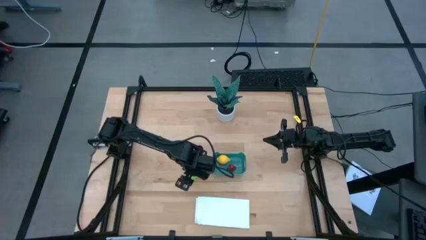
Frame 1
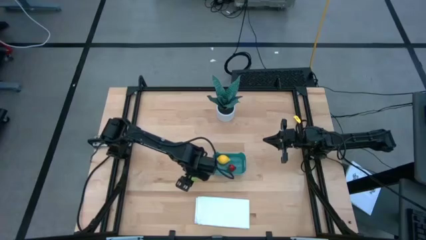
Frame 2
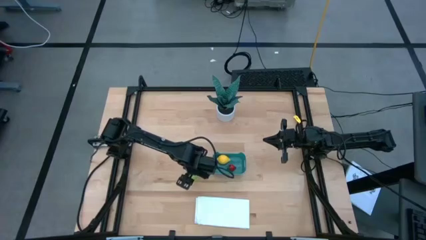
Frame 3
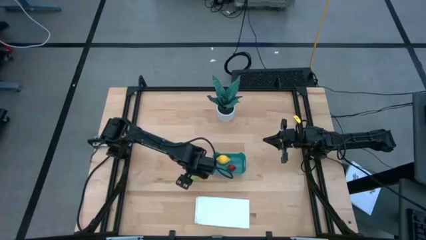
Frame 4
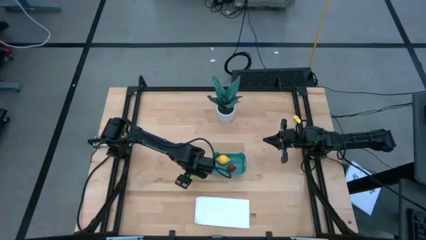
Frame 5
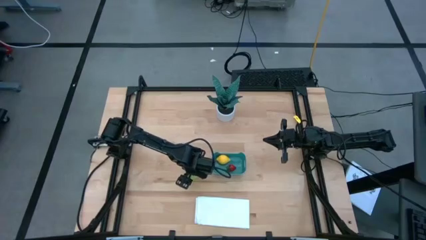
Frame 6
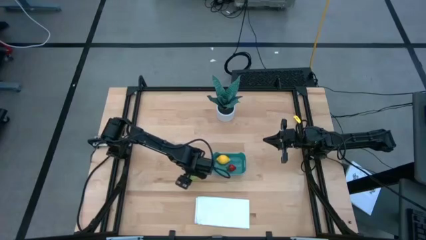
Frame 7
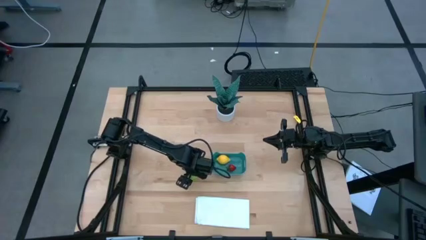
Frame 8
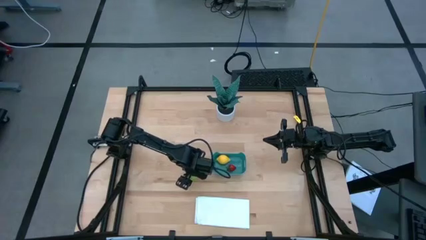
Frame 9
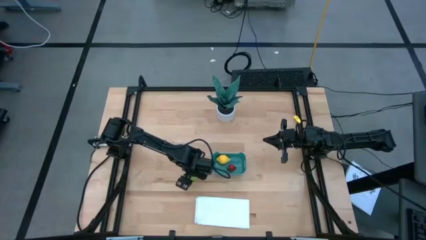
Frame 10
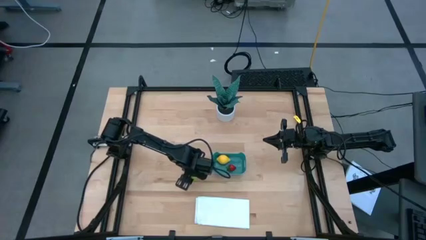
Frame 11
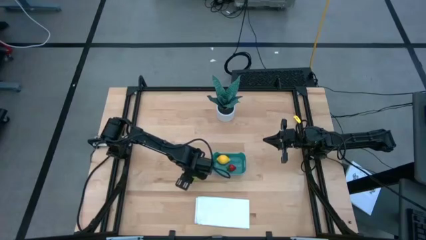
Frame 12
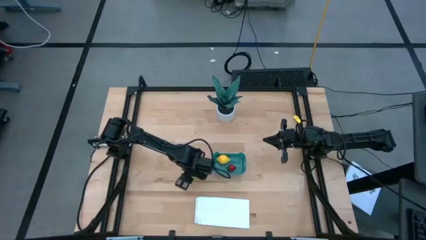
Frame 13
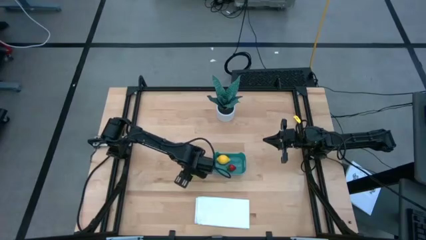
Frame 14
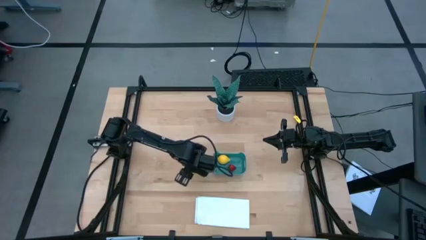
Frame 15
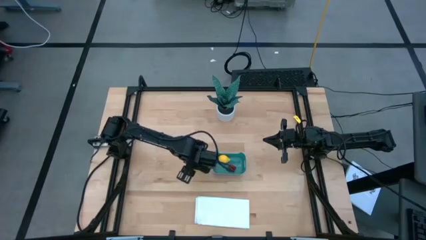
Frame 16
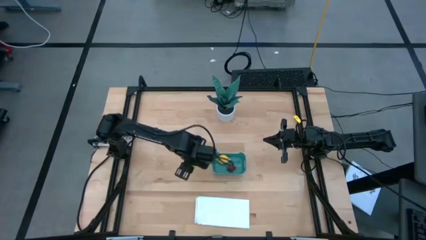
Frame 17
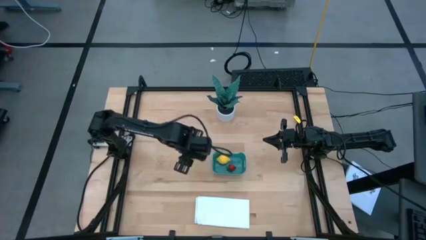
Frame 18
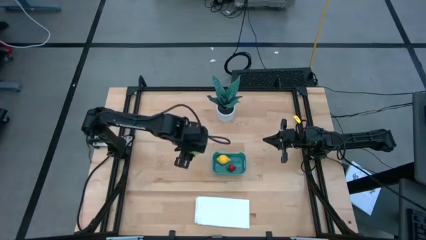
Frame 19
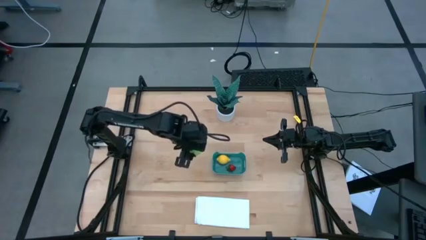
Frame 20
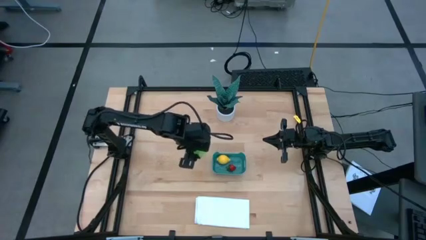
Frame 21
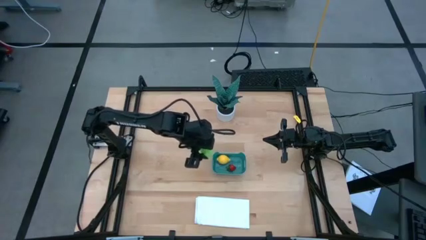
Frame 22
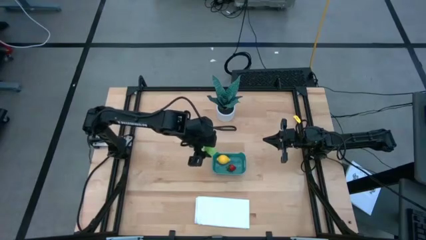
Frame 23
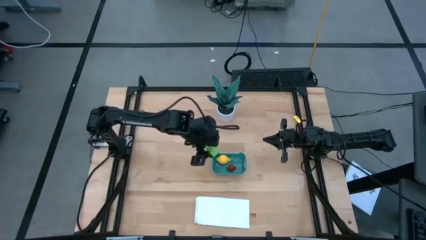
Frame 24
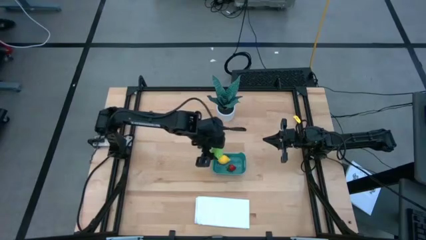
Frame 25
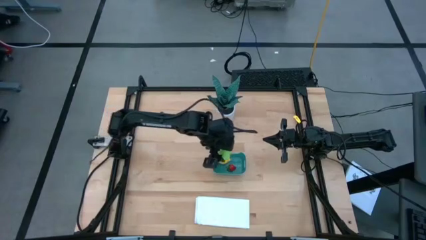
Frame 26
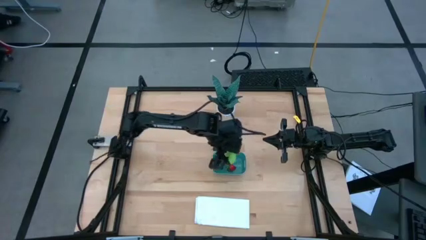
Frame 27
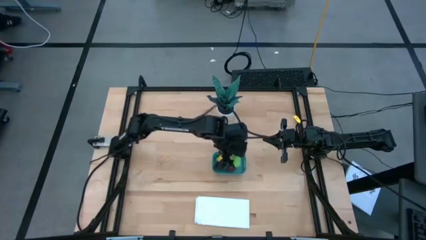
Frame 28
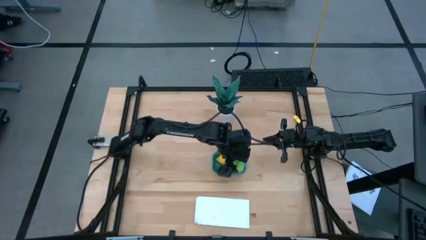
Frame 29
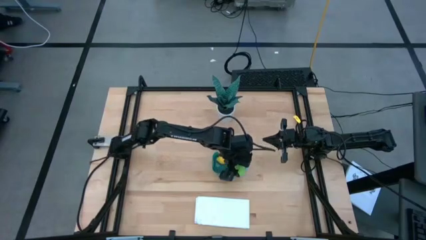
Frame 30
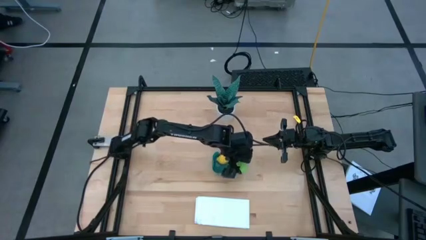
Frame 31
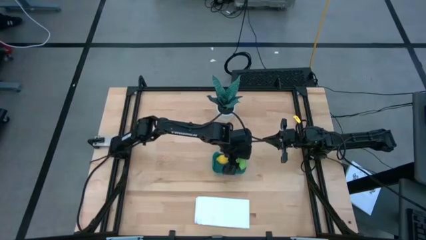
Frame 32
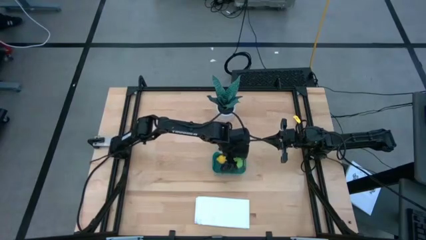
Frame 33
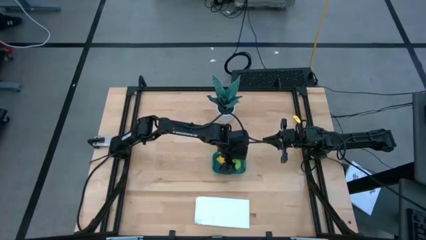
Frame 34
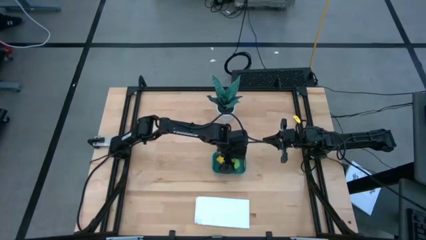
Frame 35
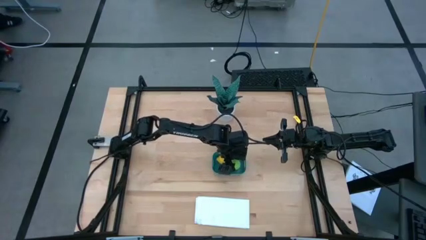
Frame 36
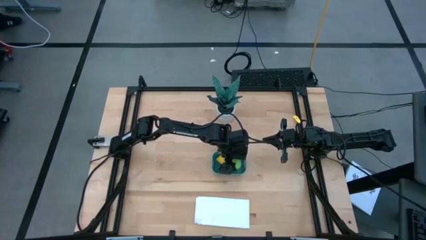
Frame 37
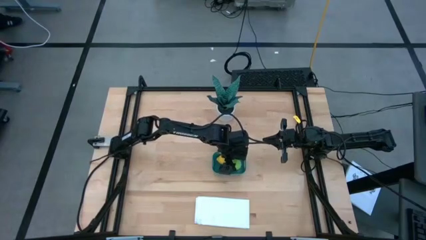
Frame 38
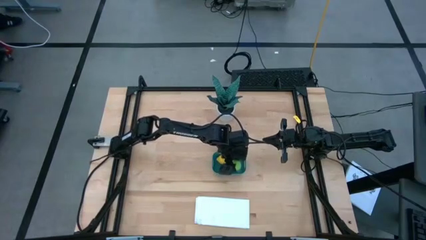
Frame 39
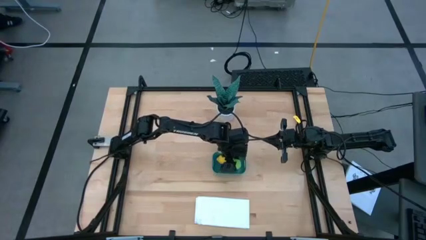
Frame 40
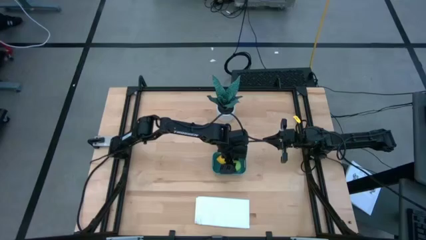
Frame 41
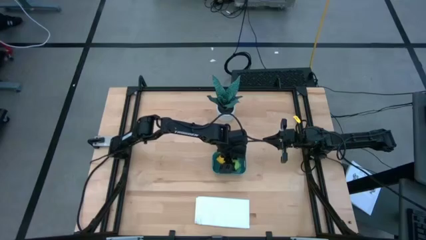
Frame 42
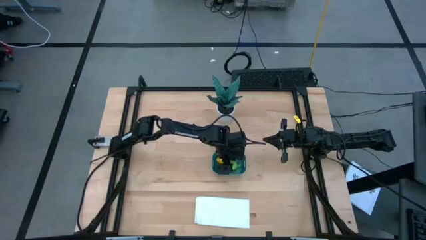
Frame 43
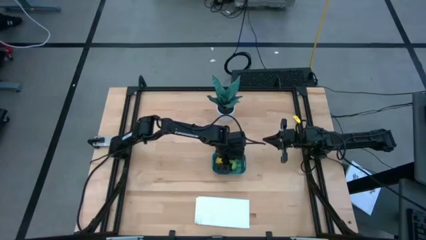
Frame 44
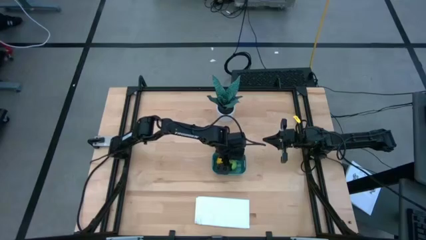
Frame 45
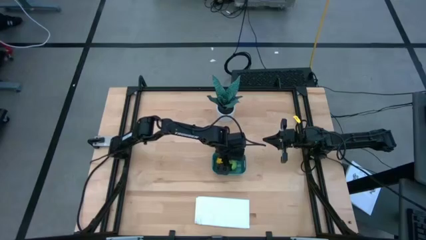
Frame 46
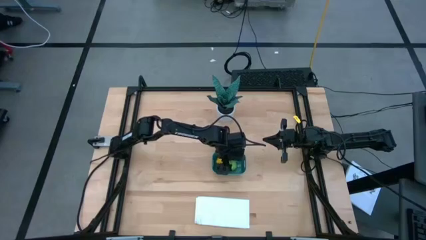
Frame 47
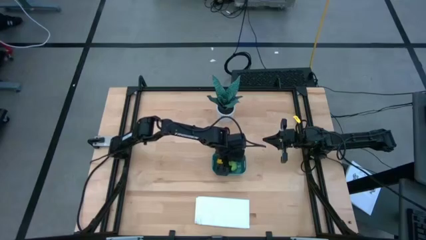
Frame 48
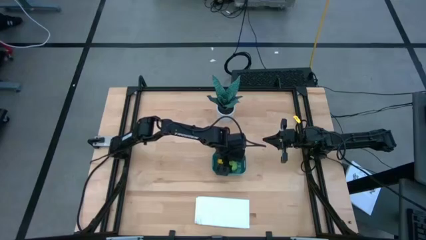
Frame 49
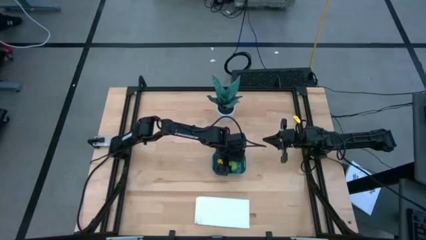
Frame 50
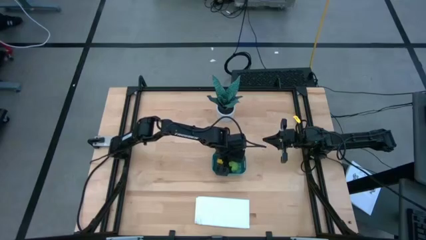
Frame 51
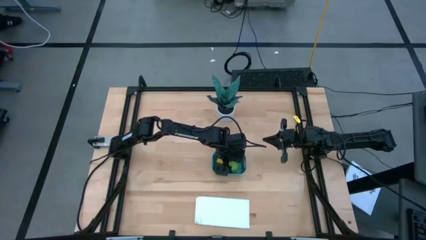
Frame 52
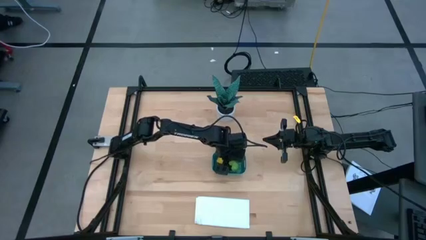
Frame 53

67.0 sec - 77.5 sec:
Task: Pick and placing Produce into tupperware
Put the green cabbage into the green bin

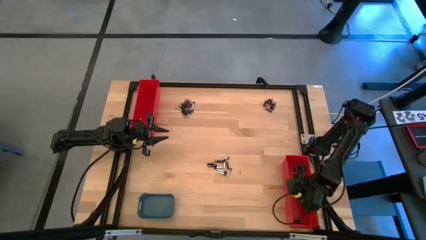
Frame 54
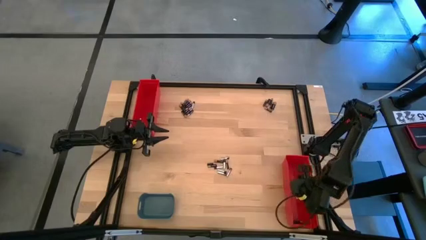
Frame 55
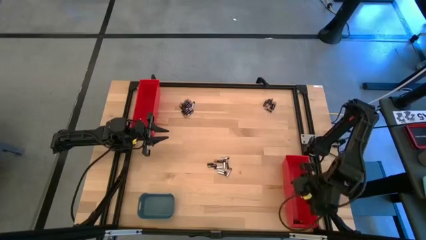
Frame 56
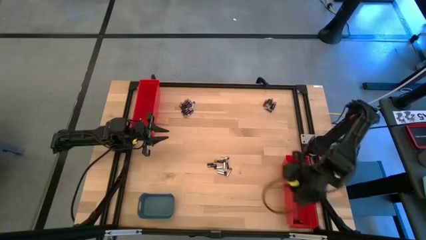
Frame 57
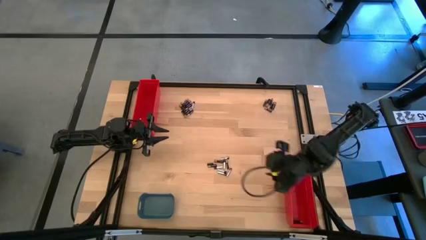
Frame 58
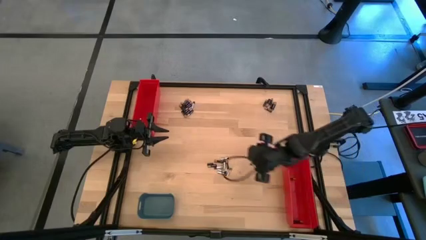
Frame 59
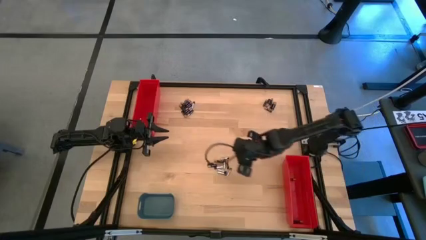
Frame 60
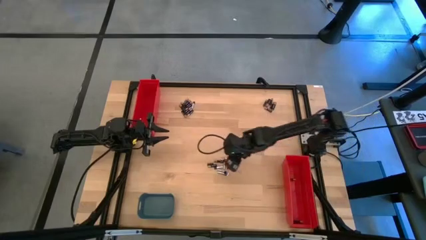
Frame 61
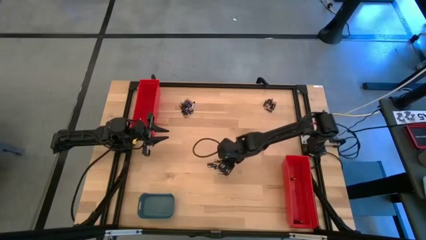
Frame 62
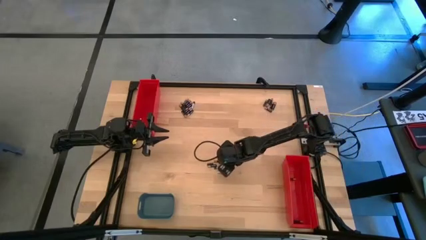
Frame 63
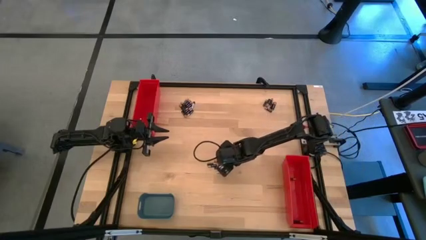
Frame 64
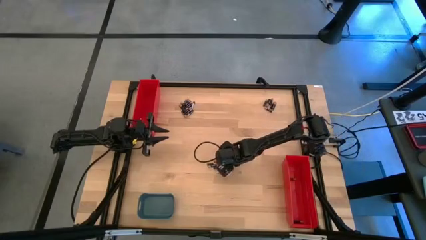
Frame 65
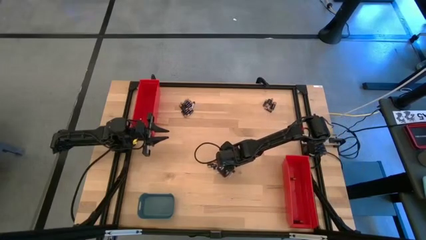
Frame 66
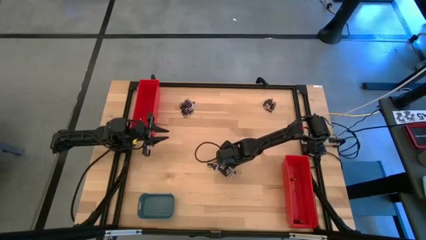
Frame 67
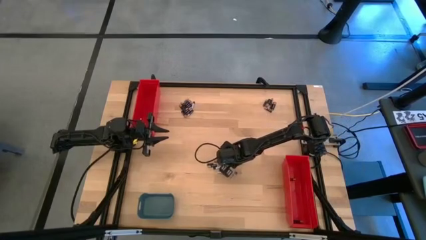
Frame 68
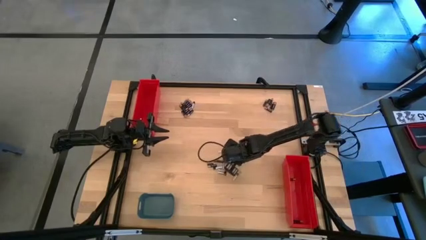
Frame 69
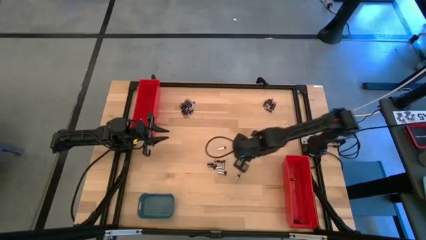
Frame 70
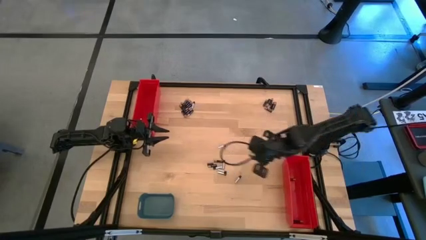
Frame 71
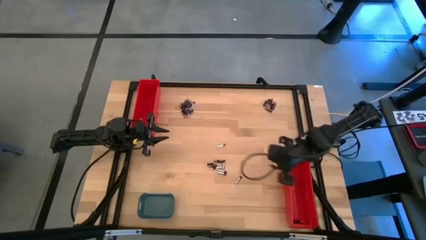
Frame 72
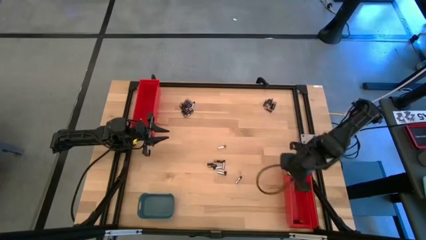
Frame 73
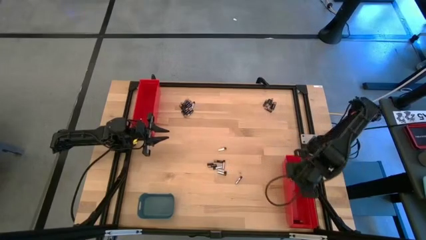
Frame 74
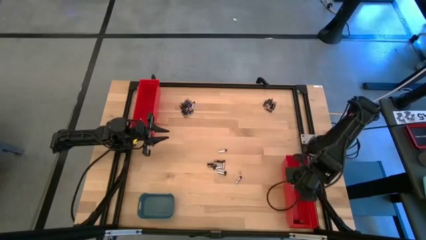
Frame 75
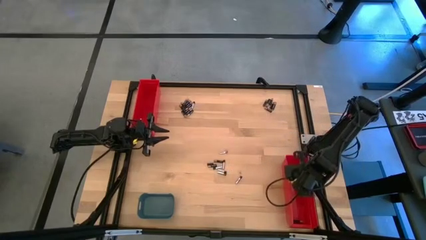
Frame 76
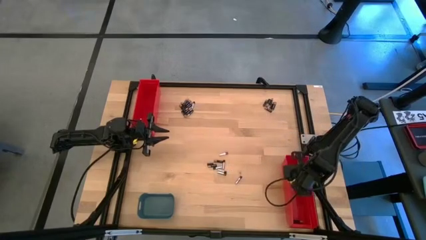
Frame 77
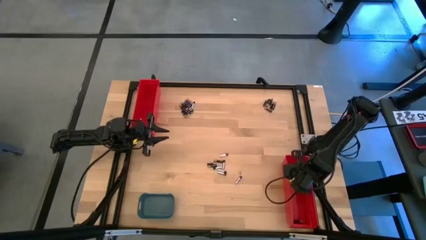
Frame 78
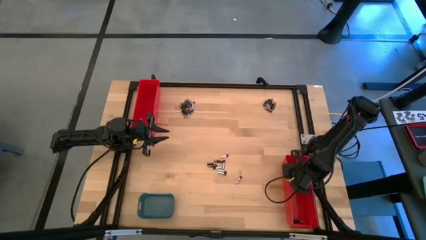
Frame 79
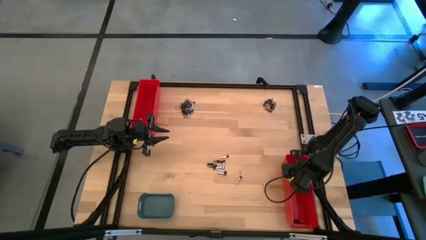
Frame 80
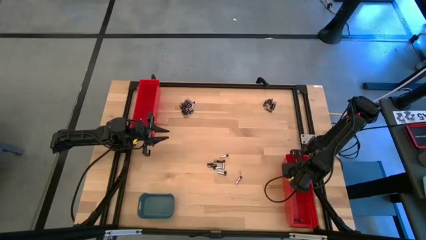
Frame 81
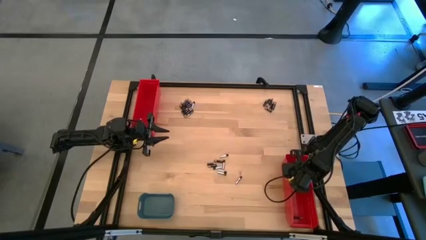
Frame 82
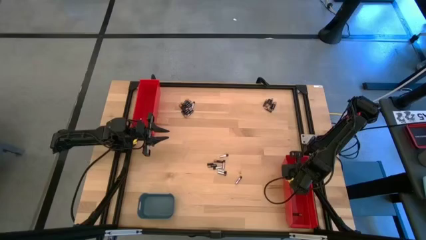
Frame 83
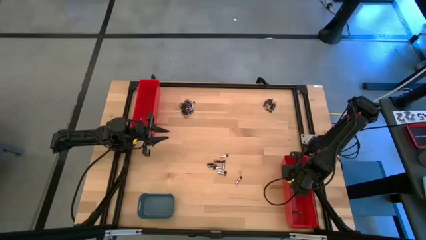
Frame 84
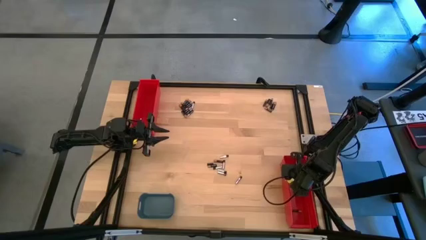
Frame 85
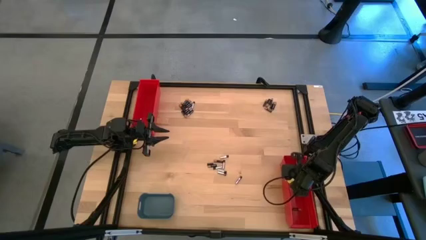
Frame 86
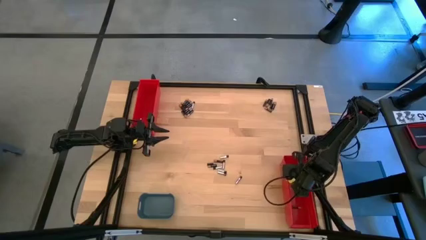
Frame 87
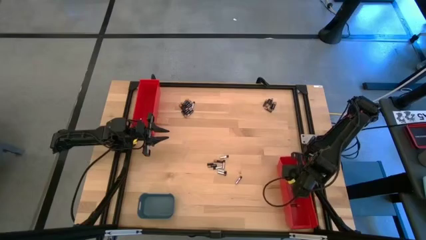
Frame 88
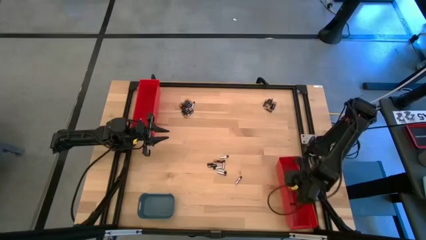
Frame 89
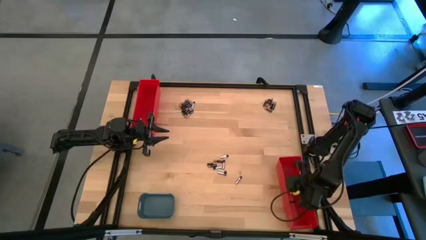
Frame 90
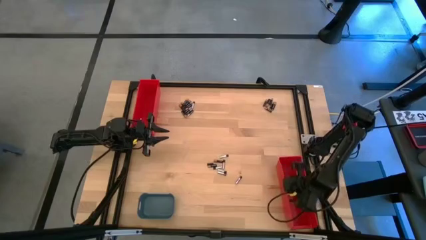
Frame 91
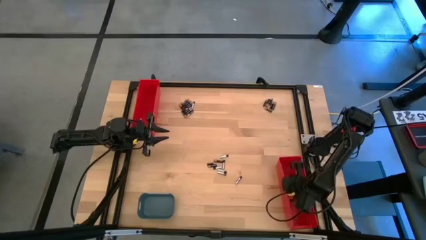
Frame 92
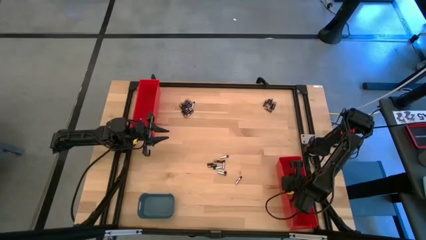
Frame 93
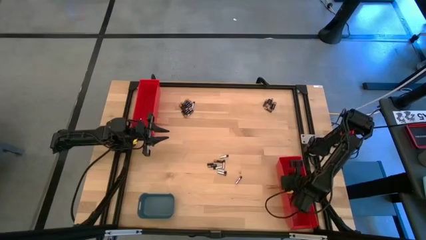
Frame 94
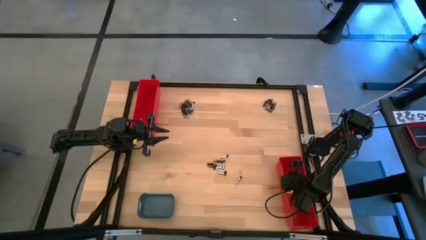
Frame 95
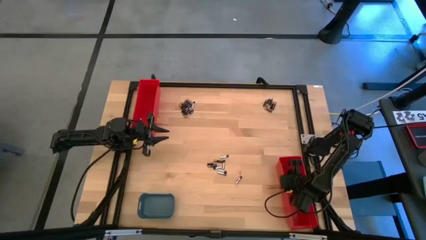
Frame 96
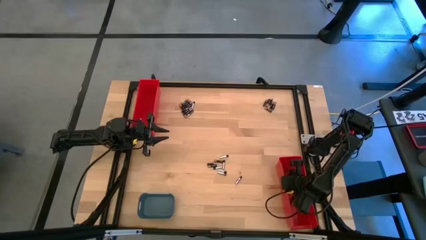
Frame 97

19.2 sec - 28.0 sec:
Task: Sort batteries
Put the small black battery into the bottom red bin
